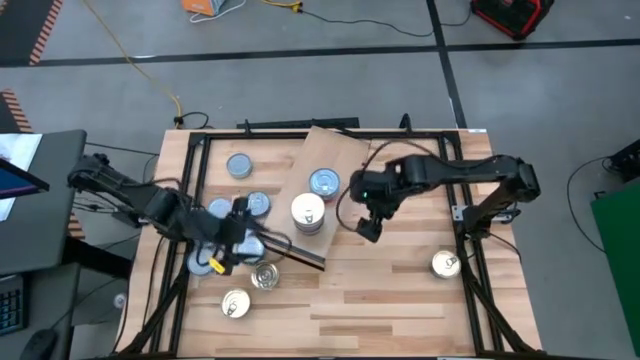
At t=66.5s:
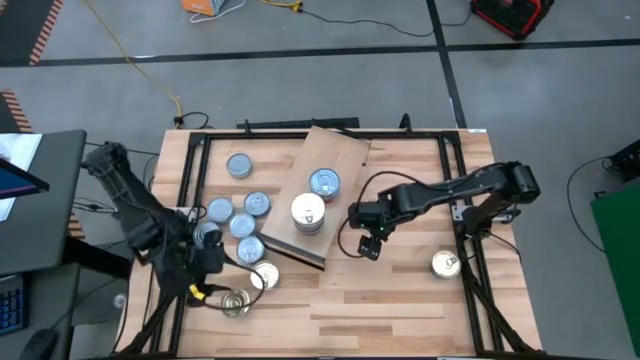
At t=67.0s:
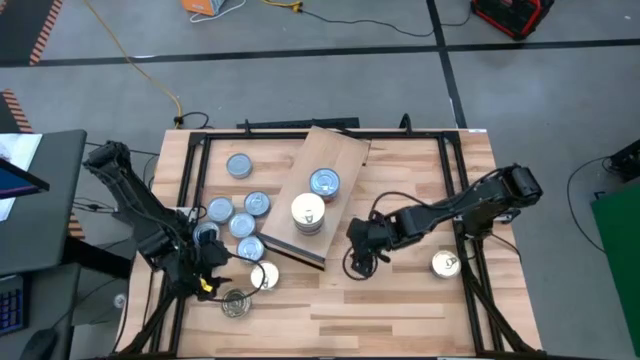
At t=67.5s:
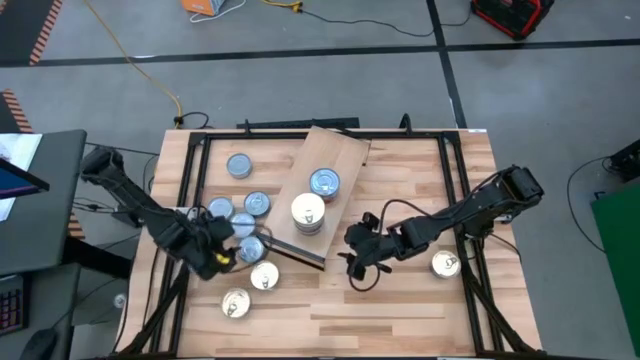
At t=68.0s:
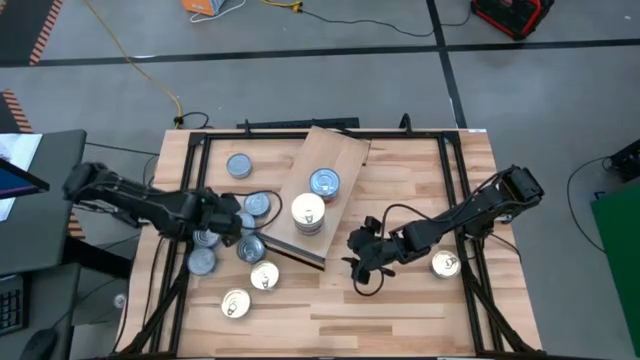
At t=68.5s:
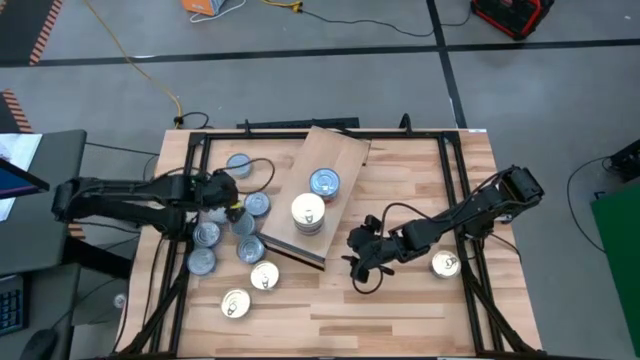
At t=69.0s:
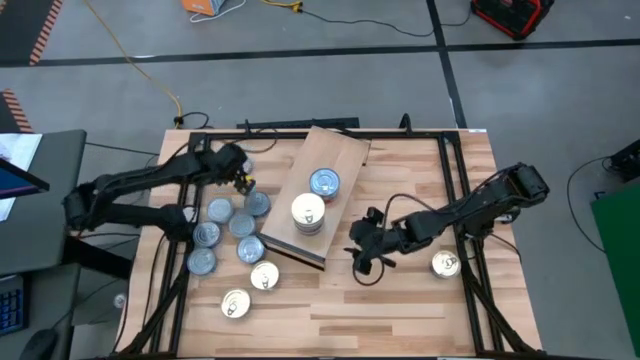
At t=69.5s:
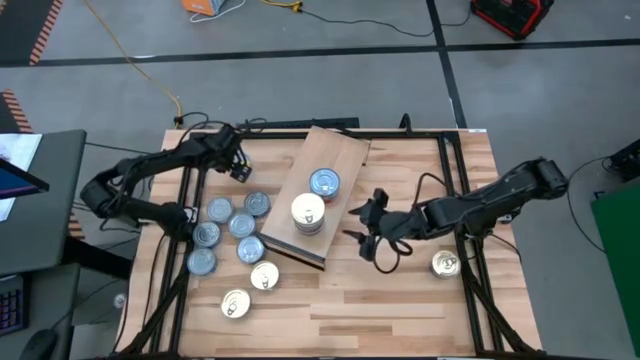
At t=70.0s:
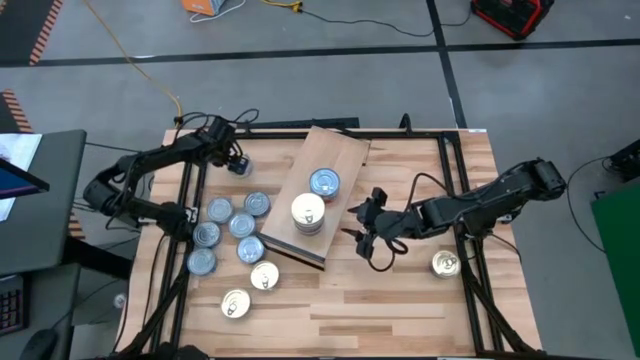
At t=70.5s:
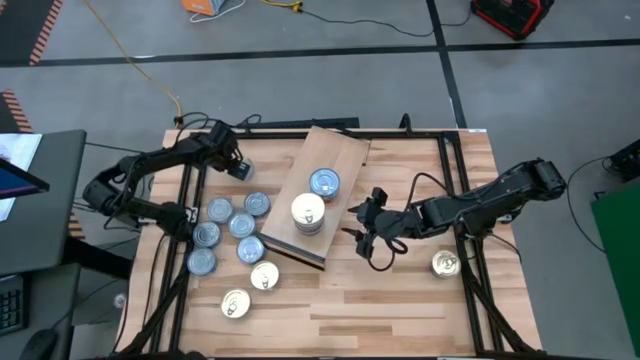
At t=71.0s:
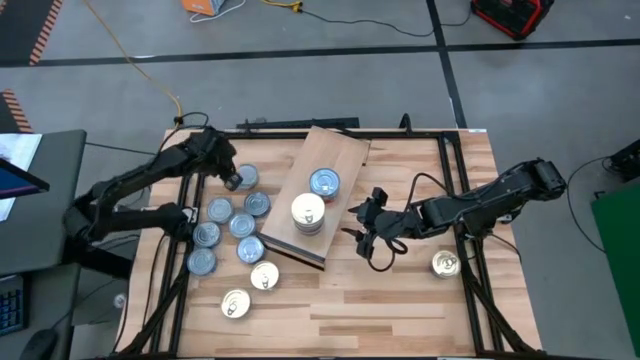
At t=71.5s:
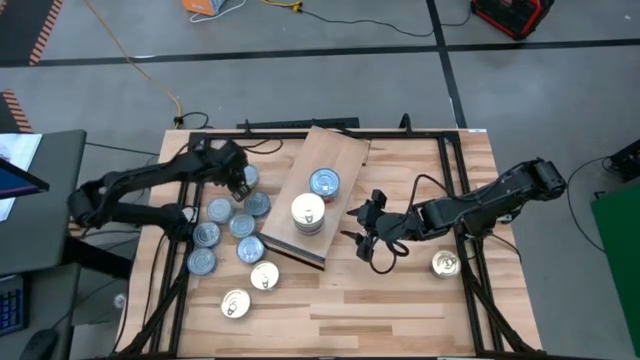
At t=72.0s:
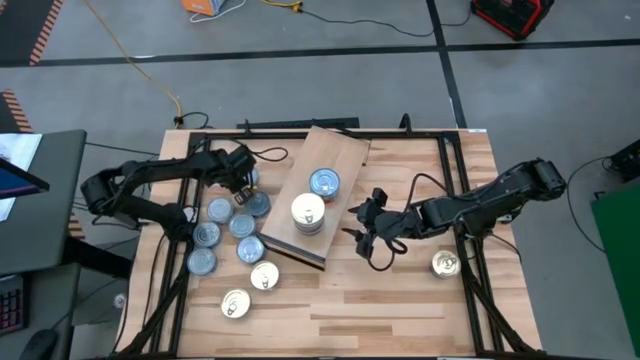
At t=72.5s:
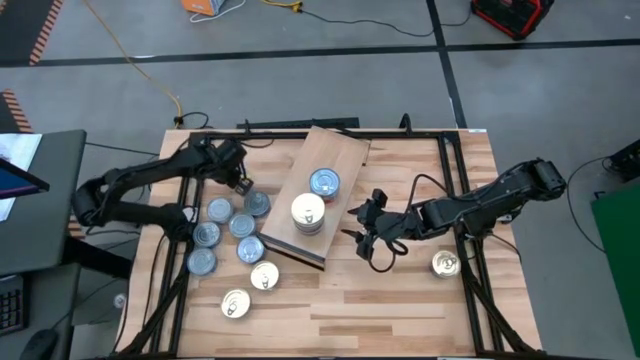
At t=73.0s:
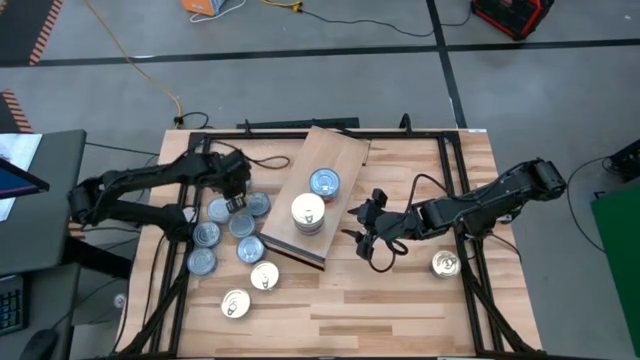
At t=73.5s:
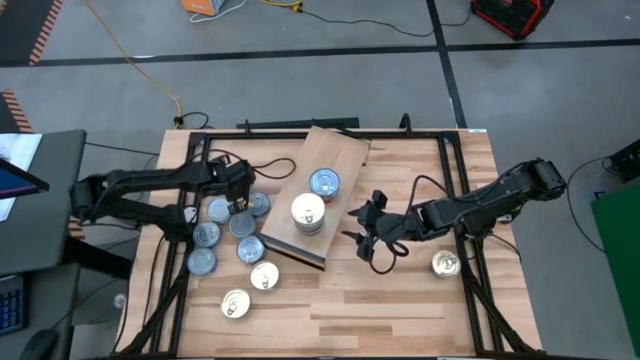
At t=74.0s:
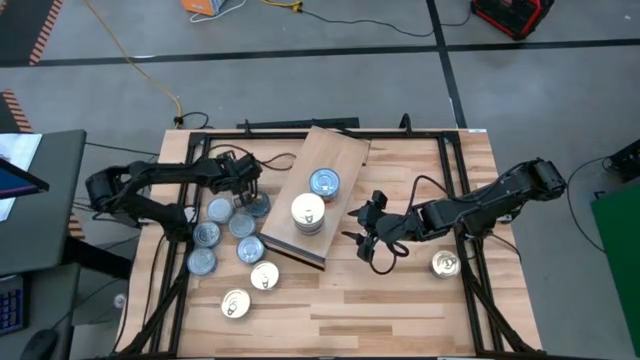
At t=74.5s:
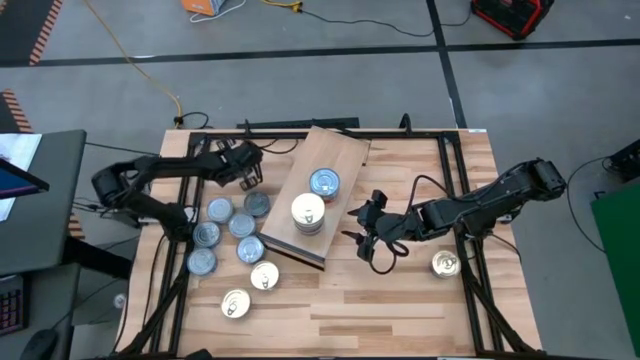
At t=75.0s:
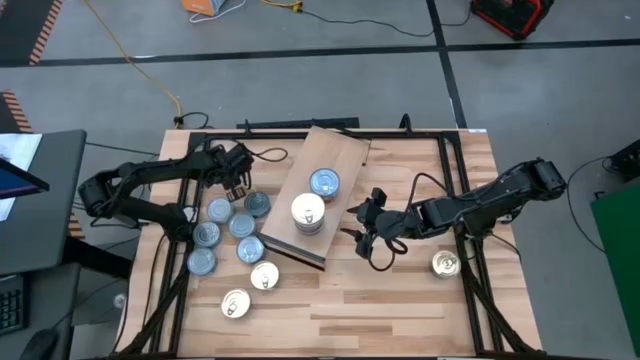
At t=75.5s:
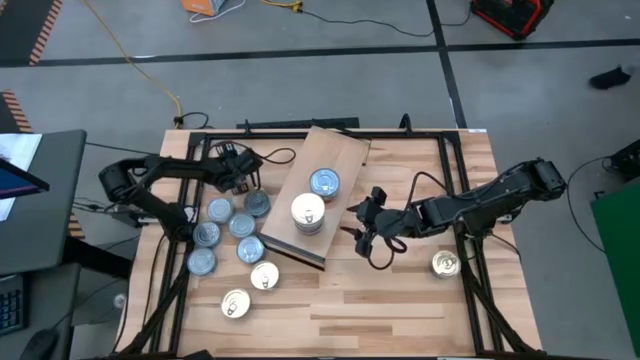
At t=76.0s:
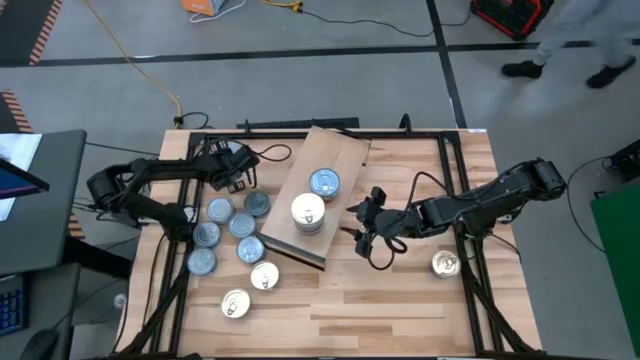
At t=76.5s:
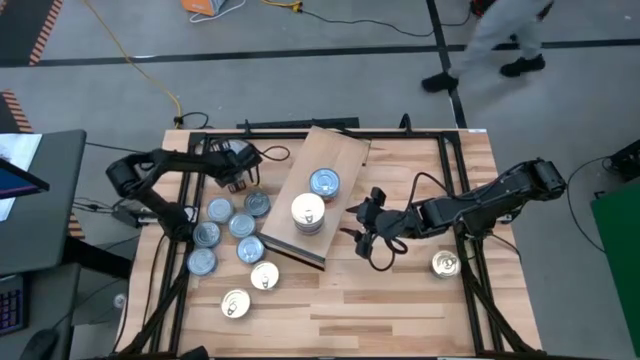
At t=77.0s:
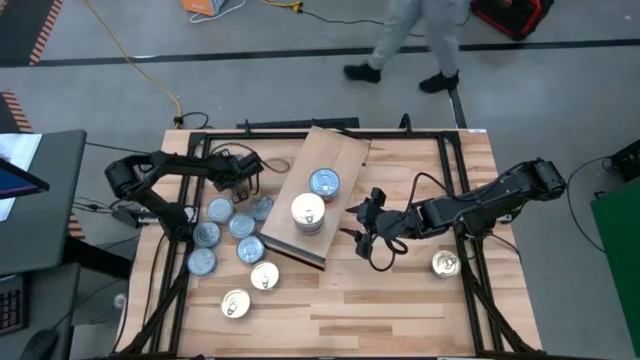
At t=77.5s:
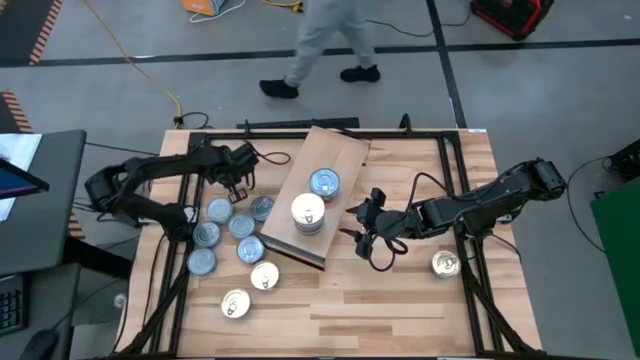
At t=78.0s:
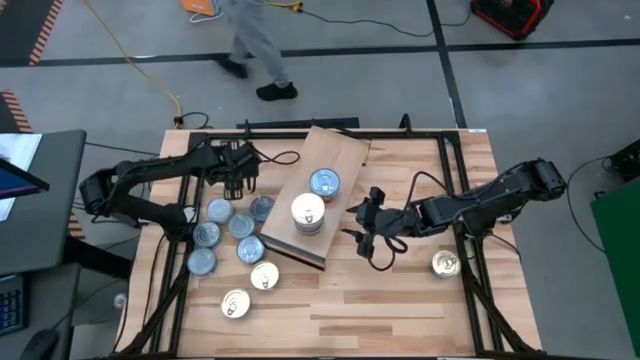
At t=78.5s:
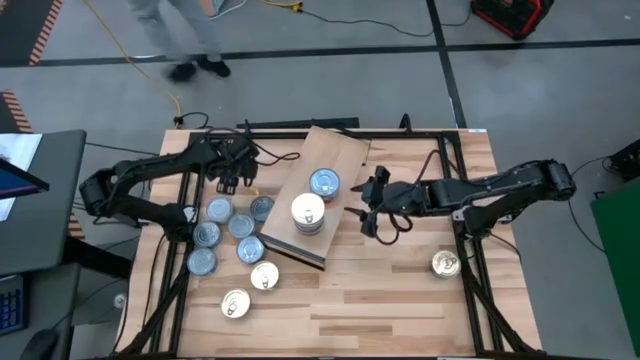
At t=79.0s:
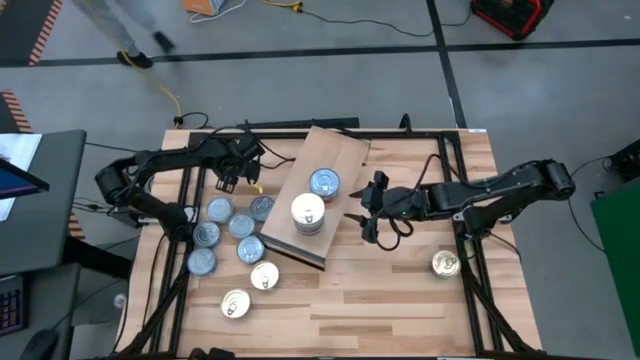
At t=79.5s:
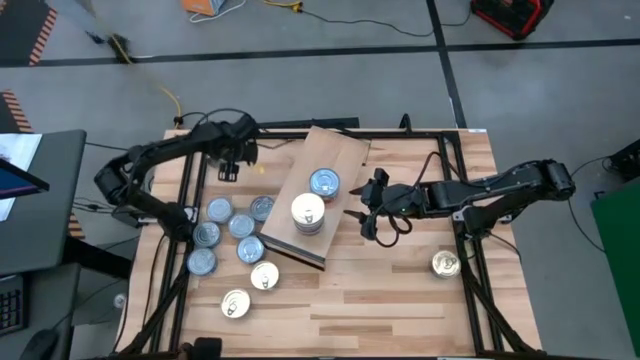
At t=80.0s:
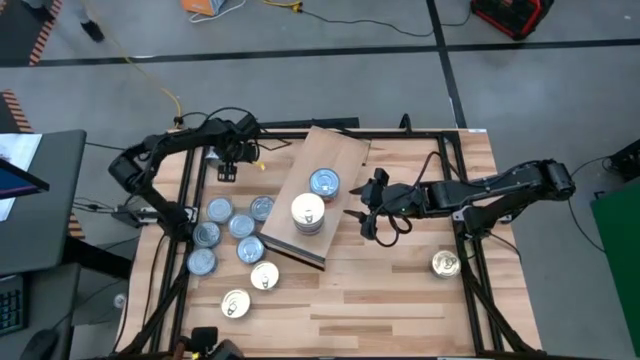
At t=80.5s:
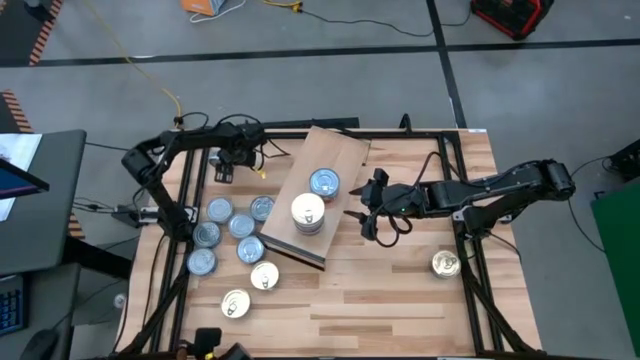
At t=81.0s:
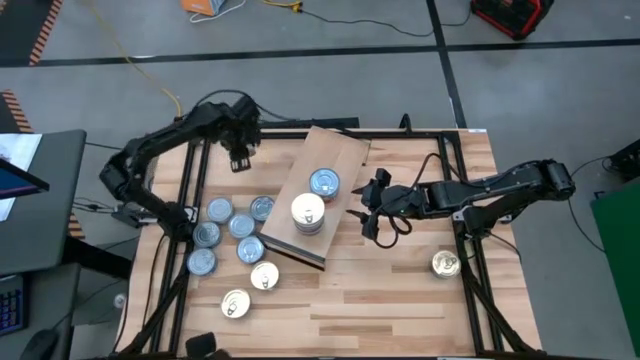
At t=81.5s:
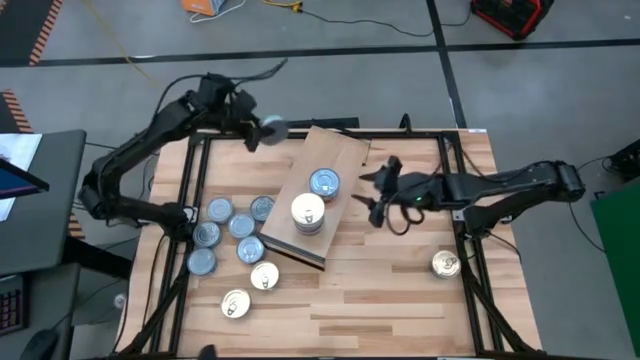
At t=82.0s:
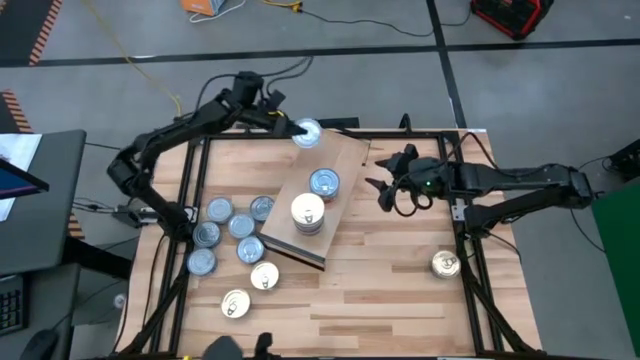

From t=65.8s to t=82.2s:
Task: Stack canned seafood by type on shelf
Put the green white tuna can on the shelf

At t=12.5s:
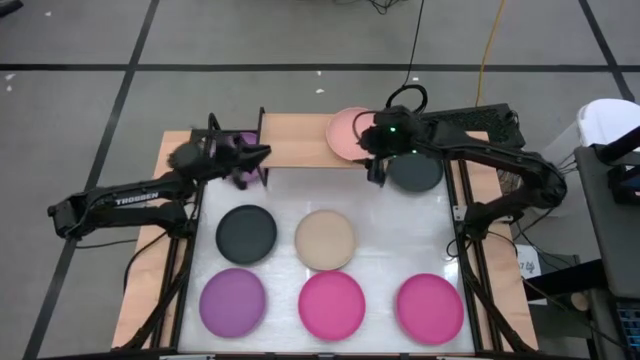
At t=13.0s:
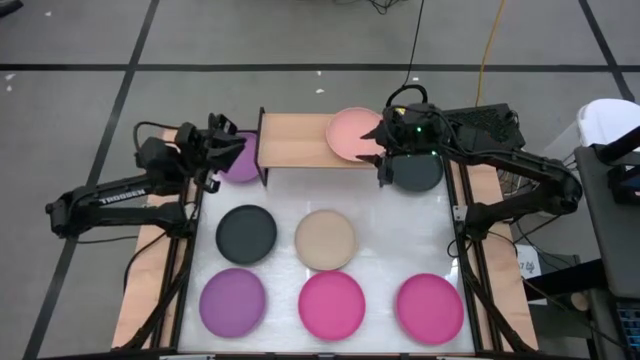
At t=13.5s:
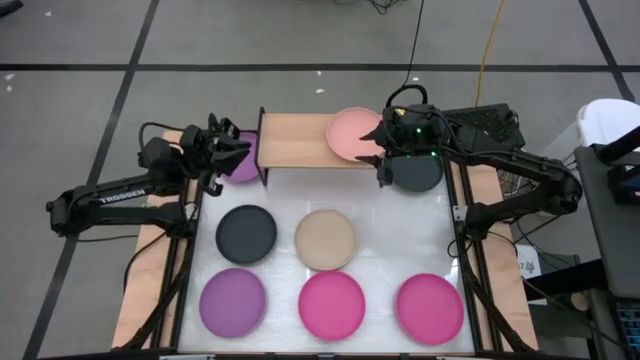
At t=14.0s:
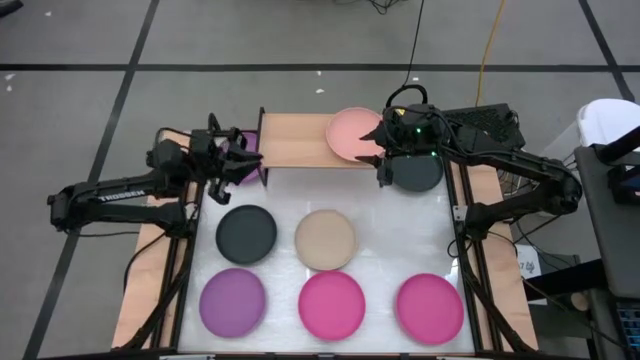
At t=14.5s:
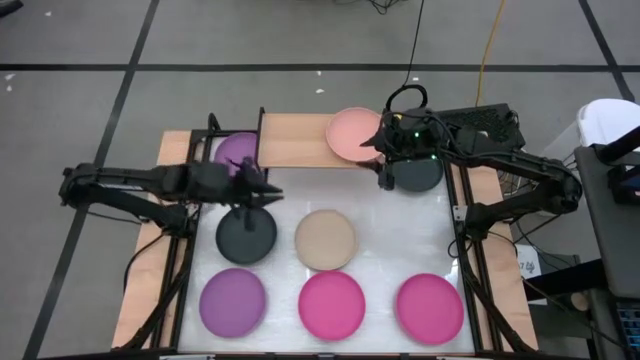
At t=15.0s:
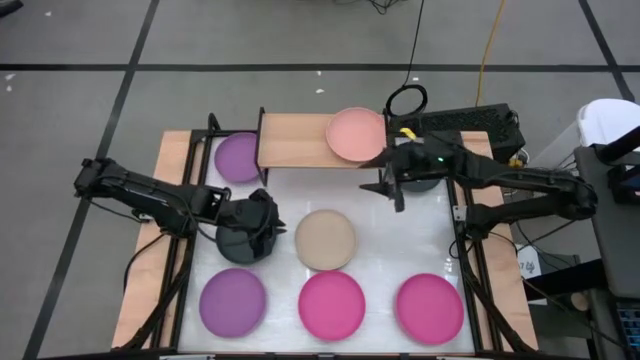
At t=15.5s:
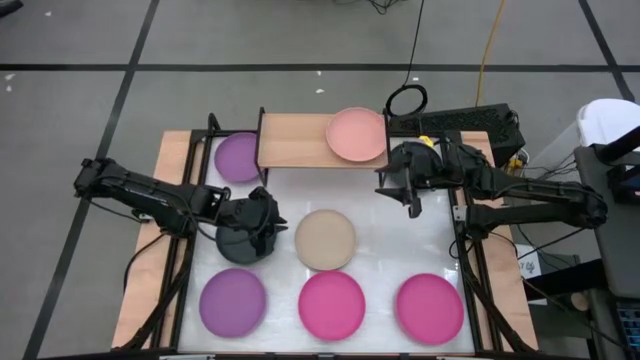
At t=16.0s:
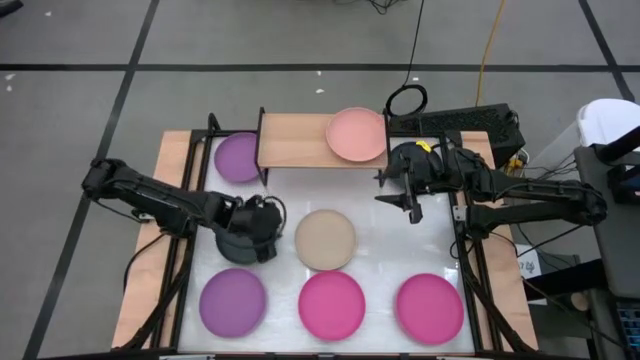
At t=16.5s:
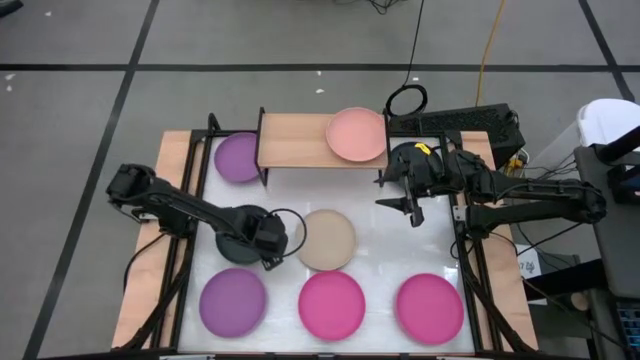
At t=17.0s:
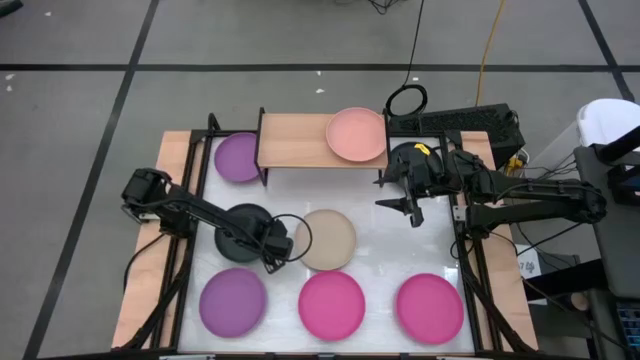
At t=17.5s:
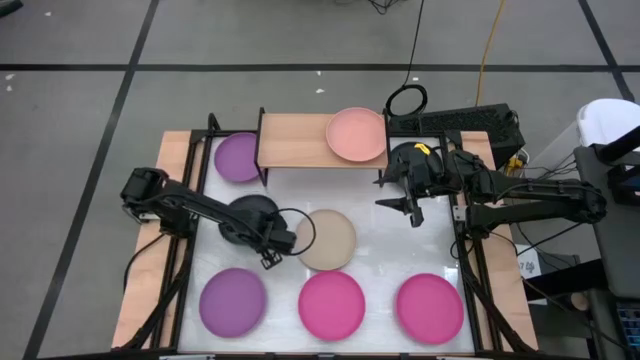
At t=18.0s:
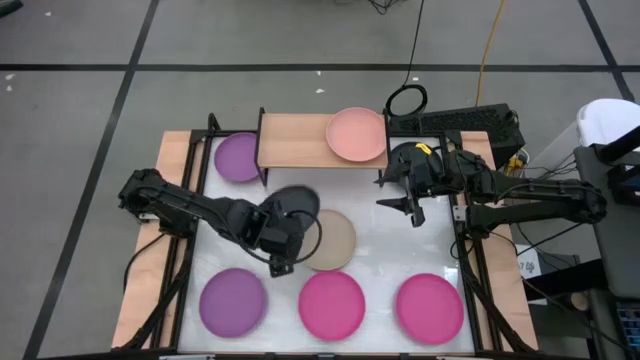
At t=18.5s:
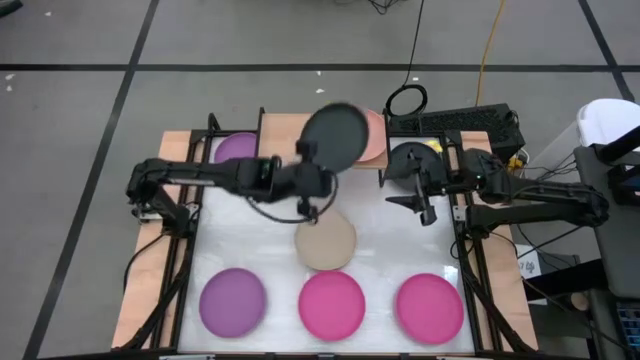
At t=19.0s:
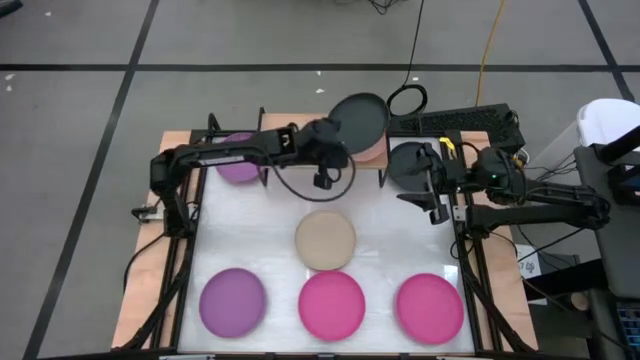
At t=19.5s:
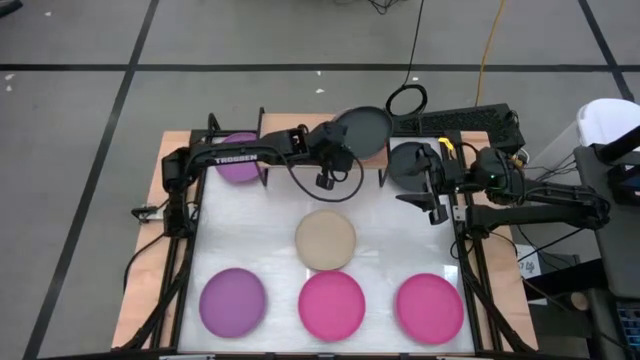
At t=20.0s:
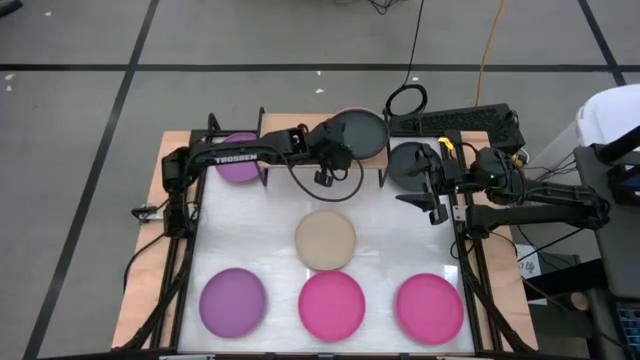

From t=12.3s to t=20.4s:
Task: Place and stack plates onto a shelf
Stack the bottom black plate on top of the light orange plate on the shelf
